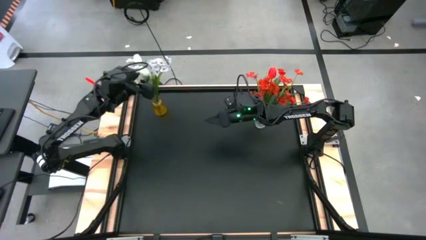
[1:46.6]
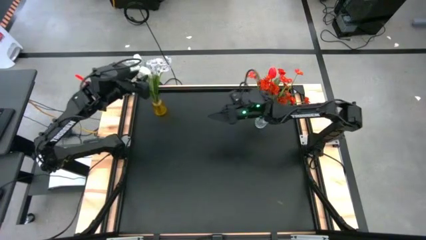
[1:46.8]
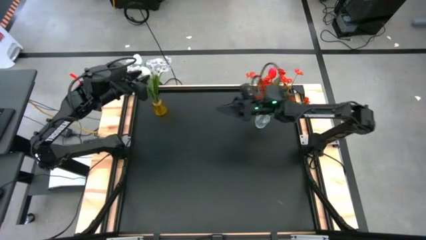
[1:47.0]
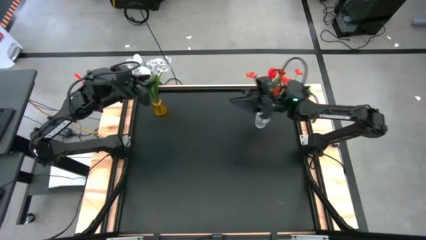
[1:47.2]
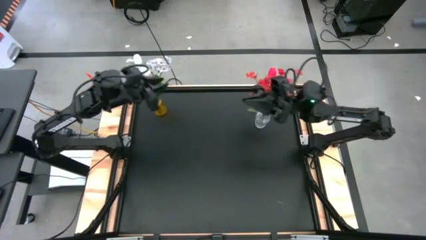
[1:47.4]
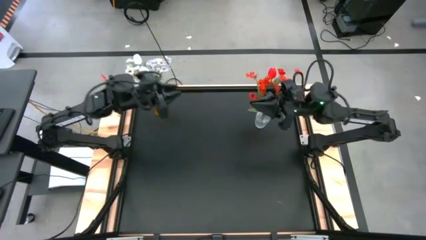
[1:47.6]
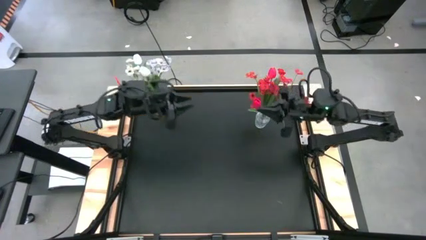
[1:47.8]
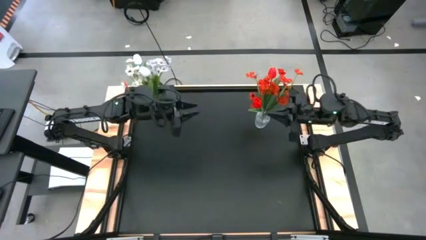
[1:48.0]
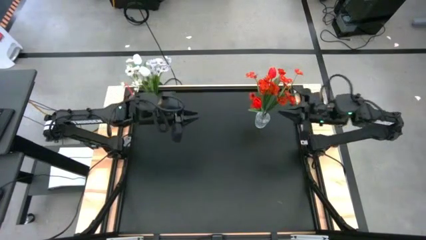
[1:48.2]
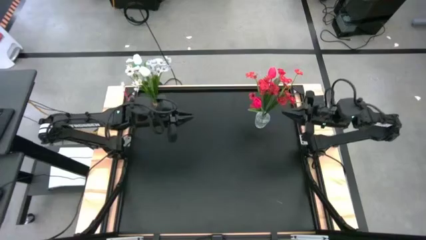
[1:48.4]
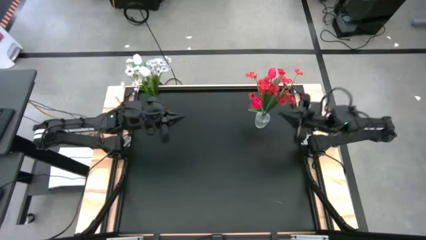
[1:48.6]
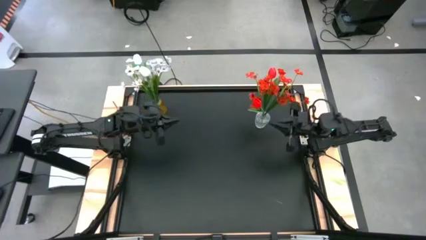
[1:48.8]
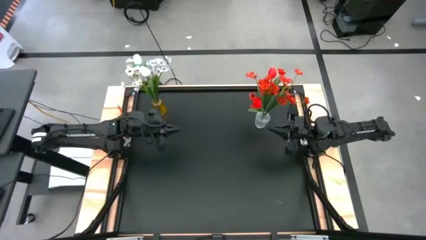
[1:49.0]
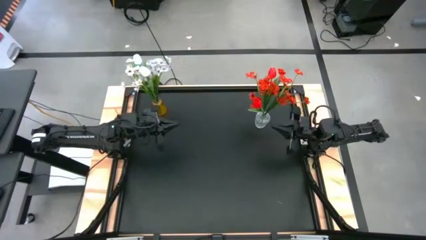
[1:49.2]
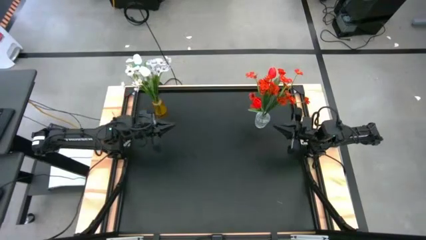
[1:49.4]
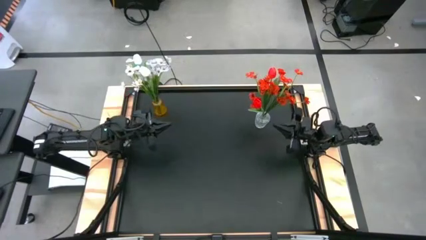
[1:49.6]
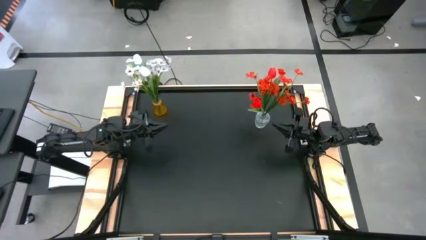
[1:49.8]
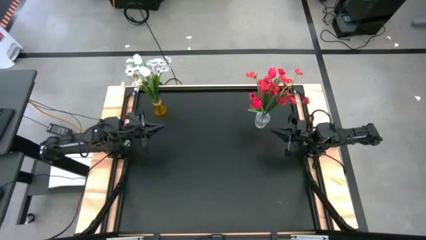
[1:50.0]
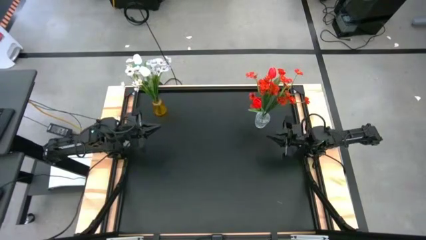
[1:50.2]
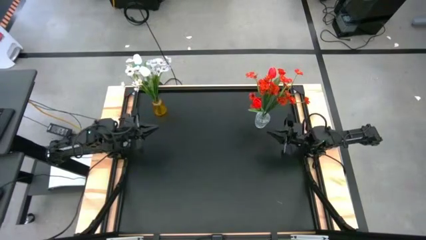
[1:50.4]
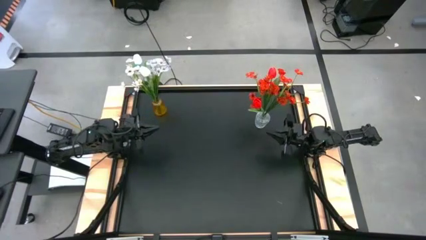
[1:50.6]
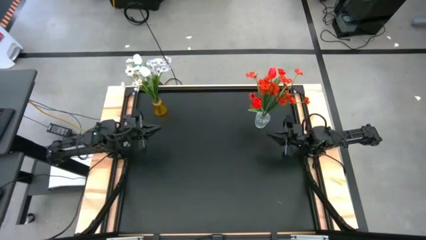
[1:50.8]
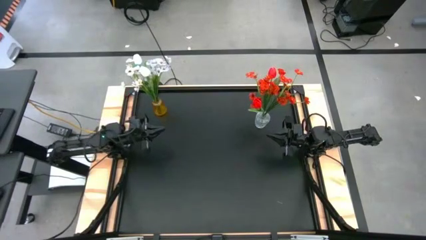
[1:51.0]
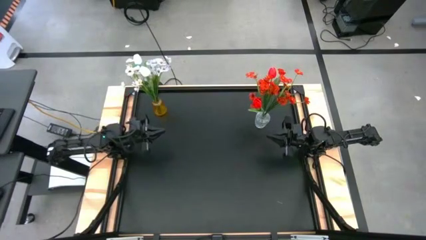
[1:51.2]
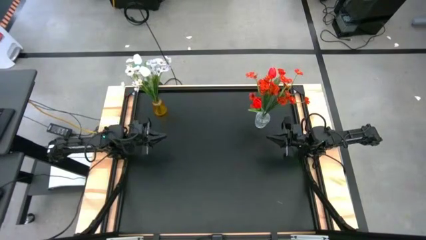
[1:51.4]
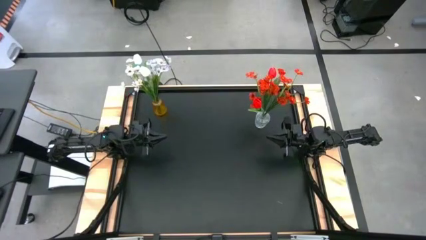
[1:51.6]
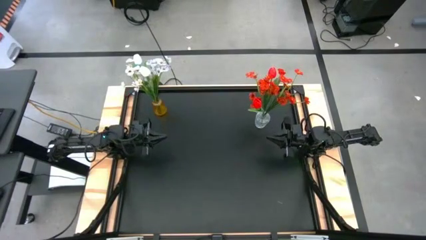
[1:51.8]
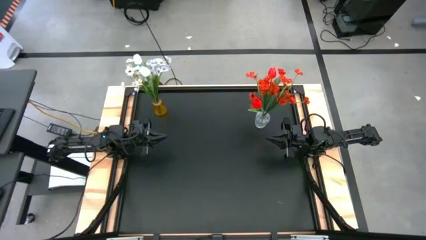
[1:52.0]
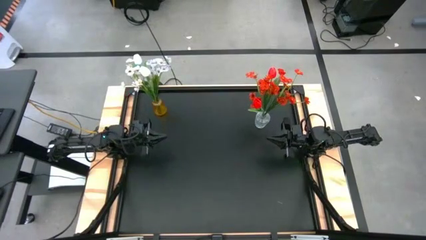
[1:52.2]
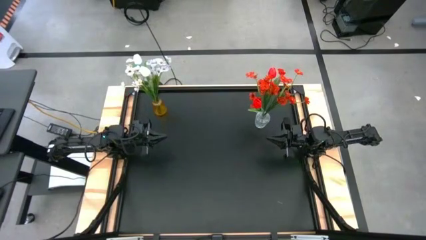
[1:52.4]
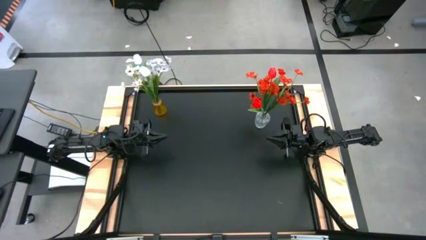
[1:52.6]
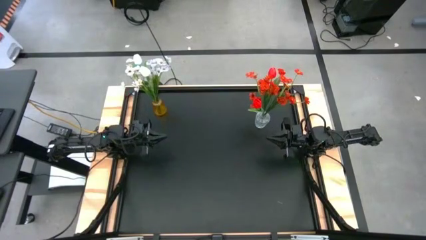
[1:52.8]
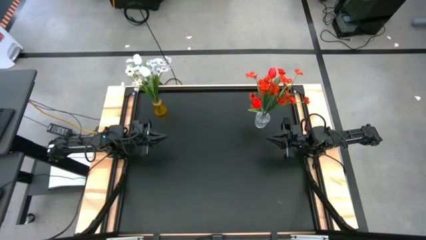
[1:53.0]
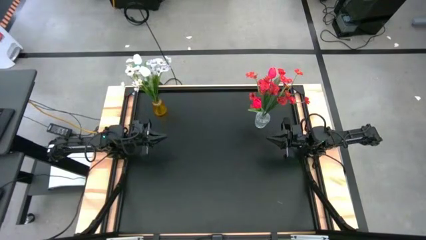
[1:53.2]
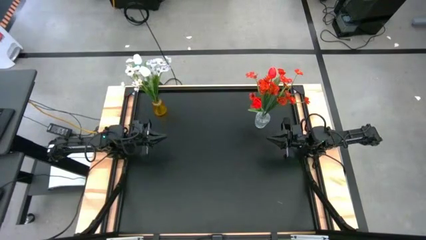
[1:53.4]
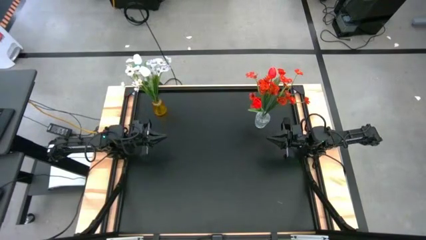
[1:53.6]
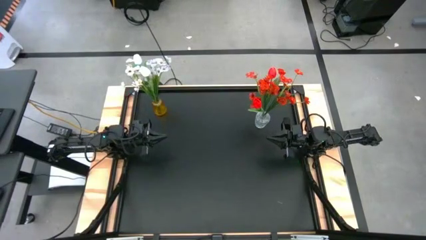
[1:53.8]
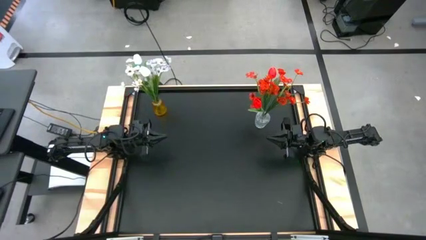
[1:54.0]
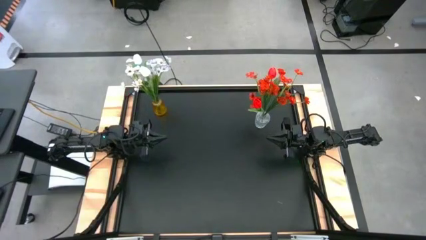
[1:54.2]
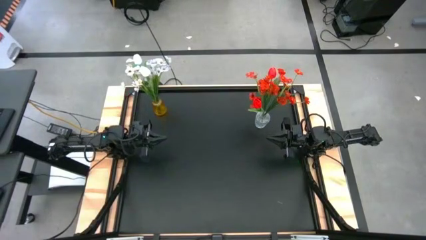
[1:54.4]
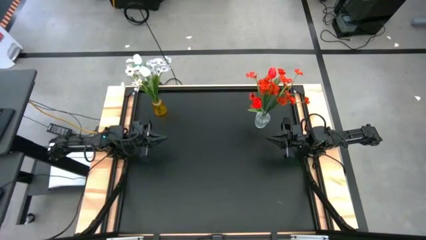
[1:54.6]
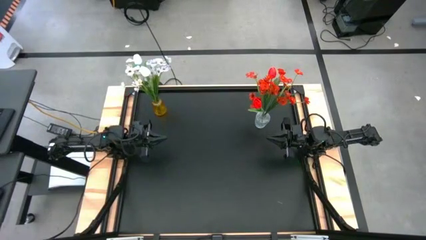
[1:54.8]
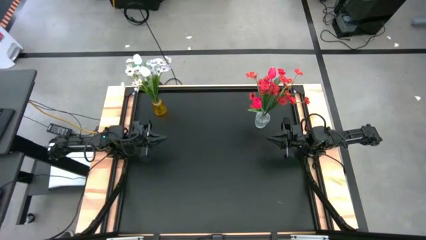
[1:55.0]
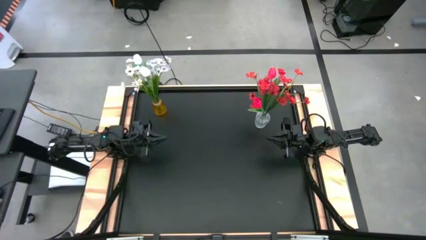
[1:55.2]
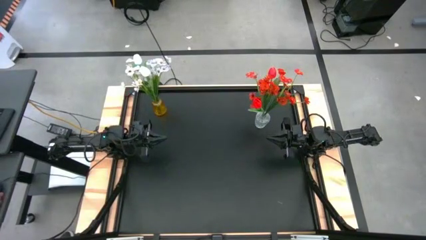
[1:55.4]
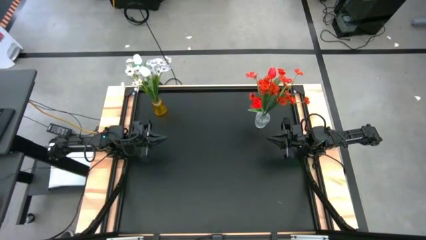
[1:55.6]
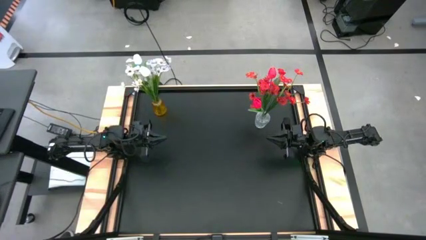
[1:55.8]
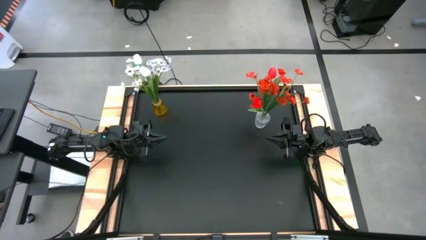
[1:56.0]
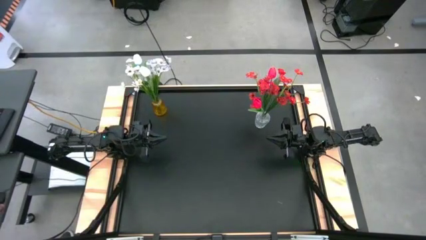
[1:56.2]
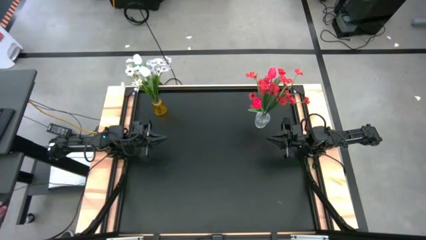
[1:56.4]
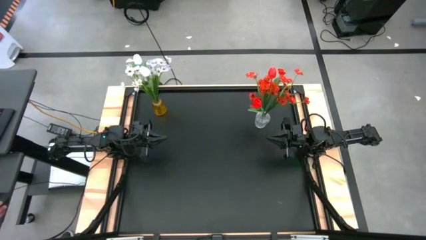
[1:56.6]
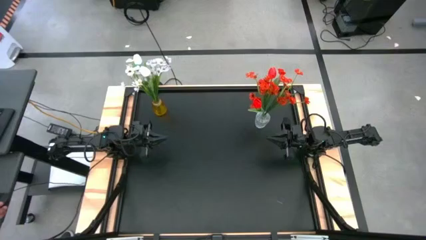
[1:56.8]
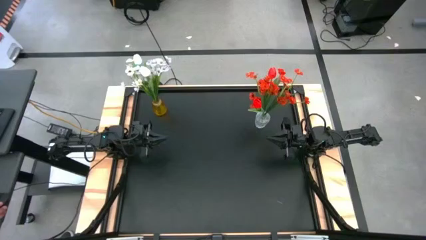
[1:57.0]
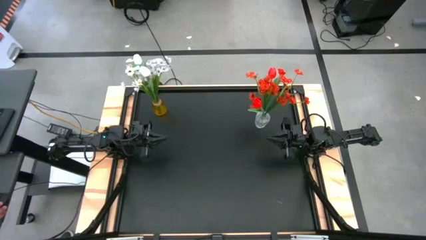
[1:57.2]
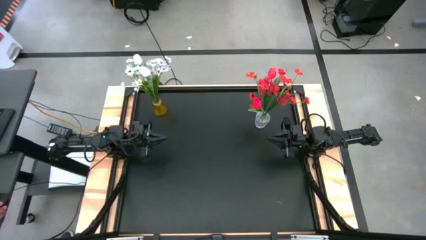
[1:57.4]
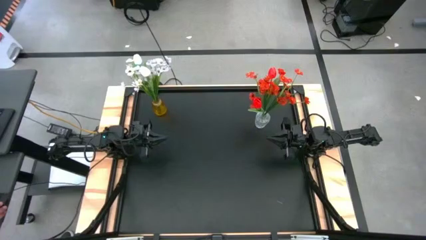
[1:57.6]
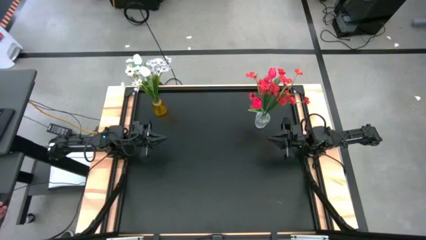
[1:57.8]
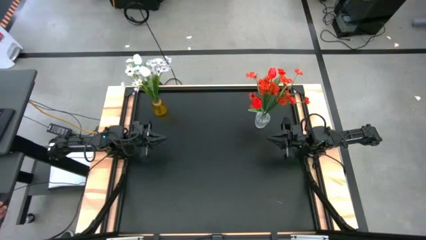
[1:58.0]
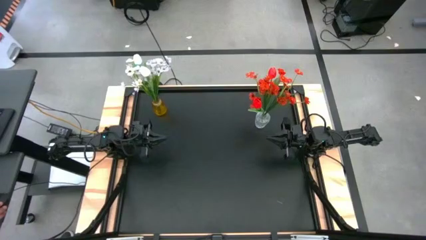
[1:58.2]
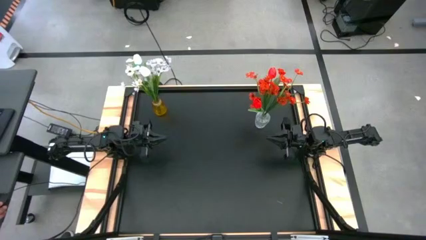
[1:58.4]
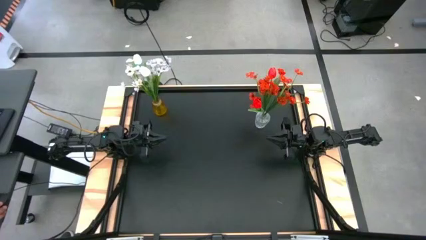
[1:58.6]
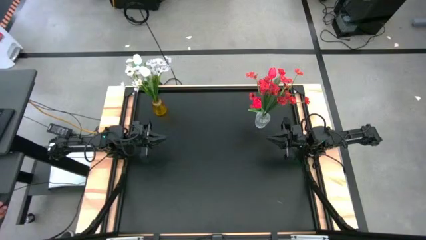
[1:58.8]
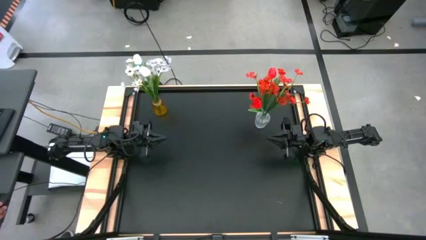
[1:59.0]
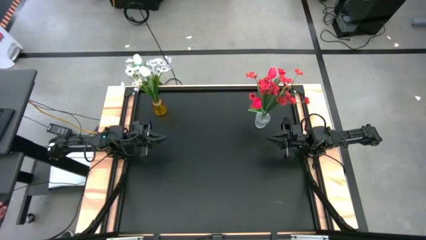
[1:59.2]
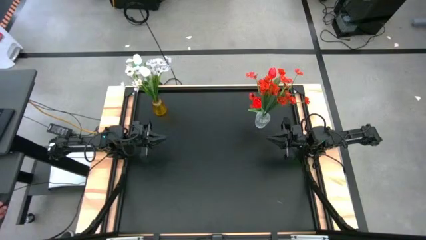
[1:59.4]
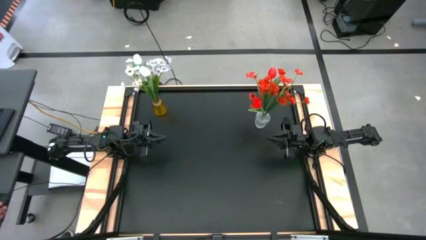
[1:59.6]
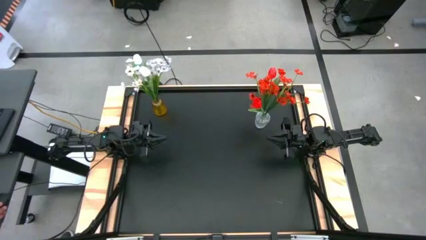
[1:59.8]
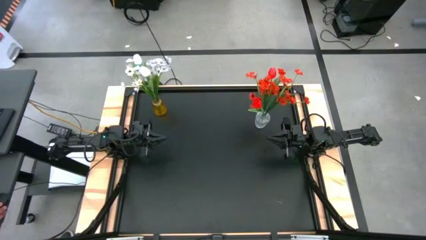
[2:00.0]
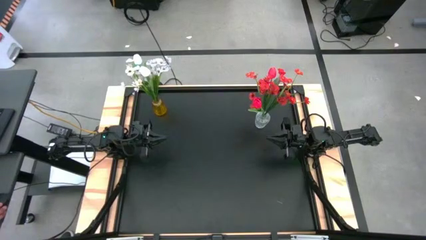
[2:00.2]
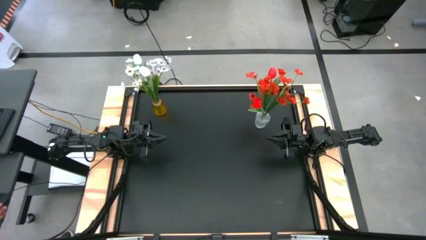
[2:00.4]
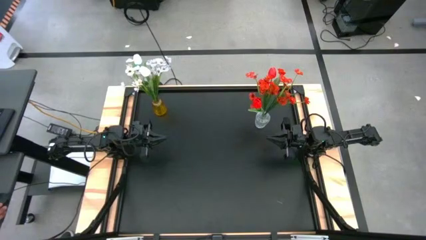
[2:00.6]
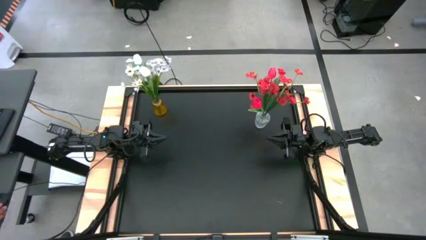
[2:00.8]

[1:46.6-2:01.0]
Task: Sort flowers into vase by color
Return to Home Position

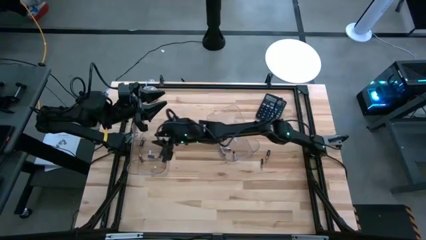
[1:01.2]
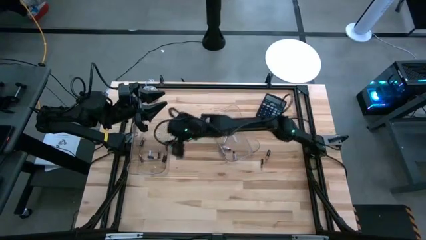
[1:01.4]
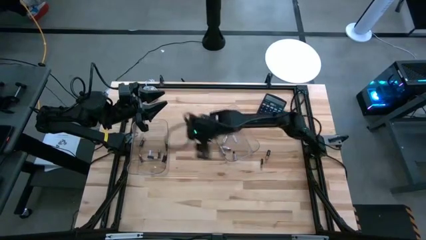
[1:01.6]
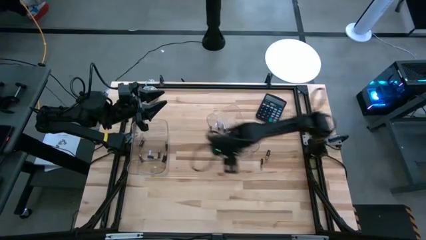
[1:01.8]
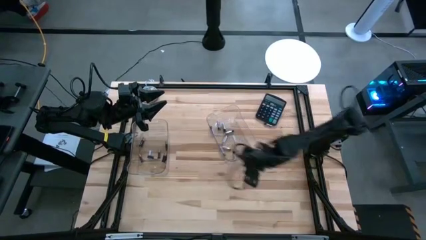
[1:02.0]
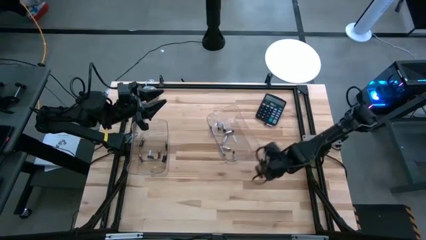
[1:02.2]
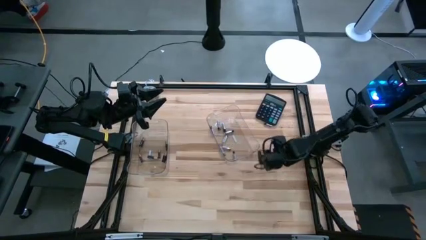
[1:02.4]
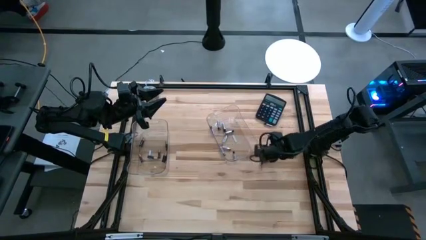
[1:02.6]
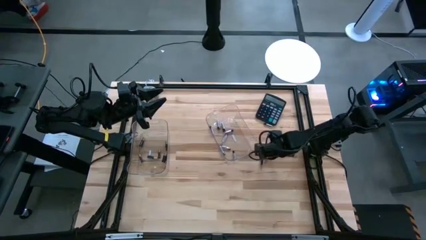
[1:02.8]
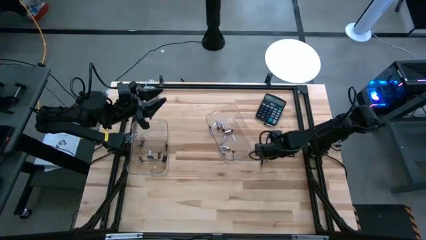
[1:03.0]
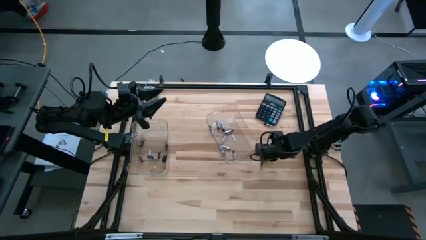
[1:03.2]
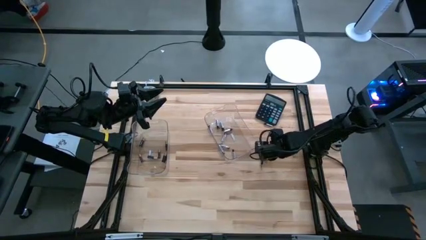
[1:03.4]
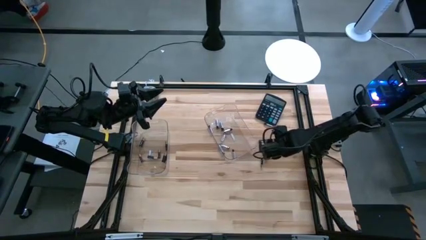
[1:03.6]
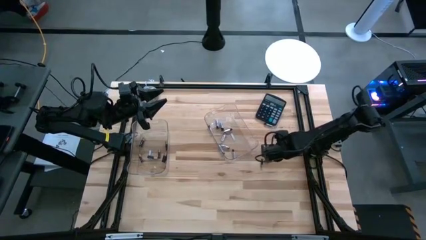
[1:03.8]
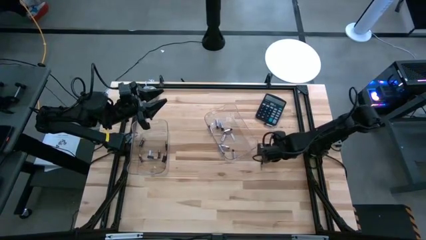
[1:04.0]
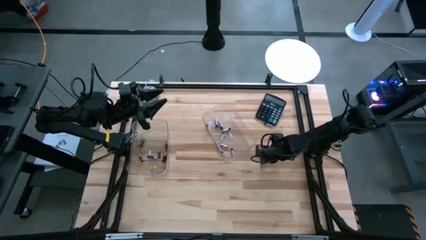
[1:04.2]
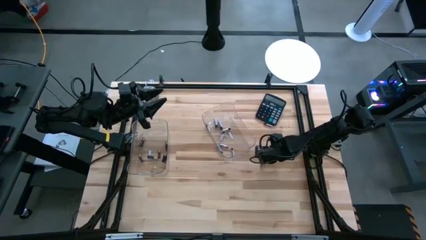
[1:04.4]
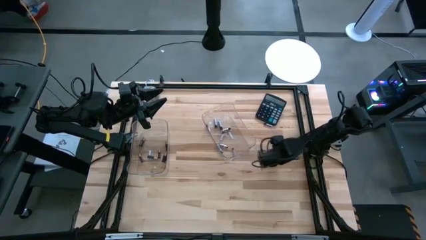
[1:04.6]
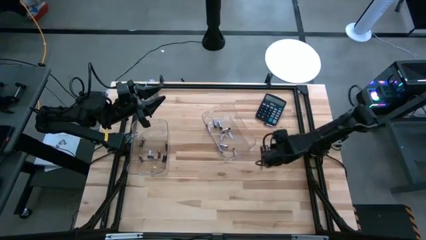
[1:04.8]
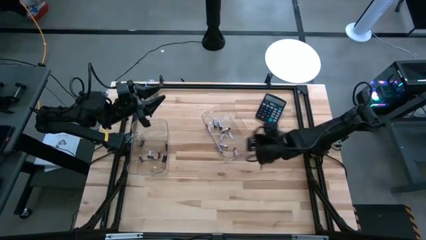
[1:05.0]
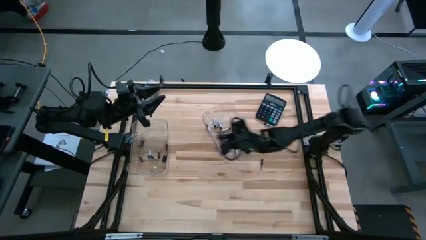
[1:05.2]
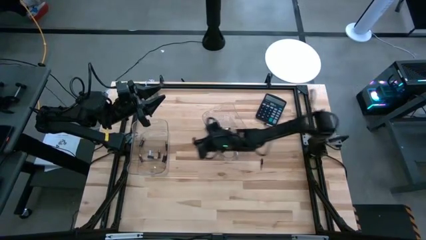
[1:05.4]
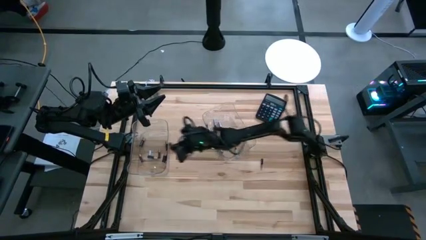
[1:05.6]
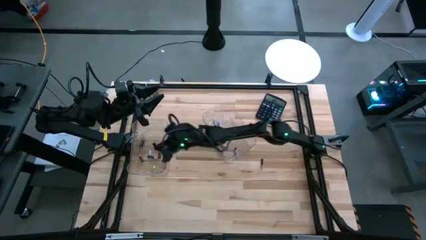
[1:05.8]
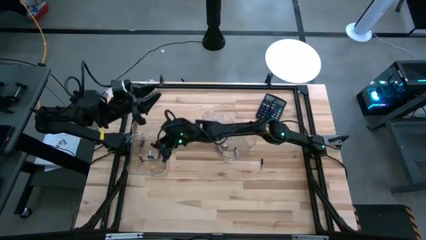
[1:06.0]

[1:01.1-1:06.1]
Task: Sort batteries
Put the black battery into the left transparent bin
